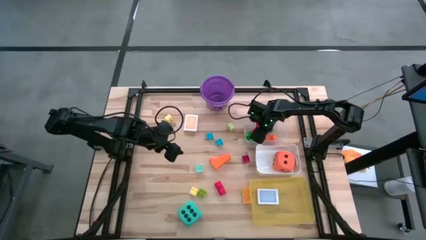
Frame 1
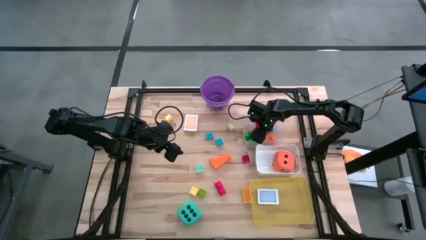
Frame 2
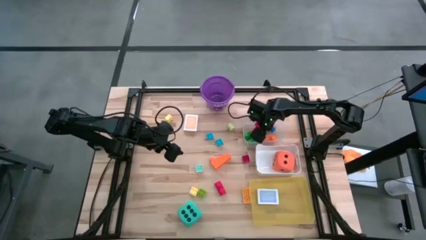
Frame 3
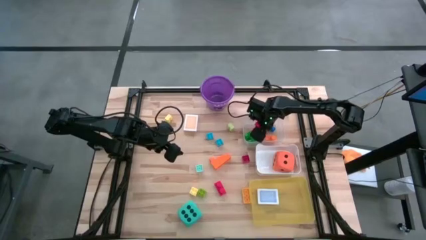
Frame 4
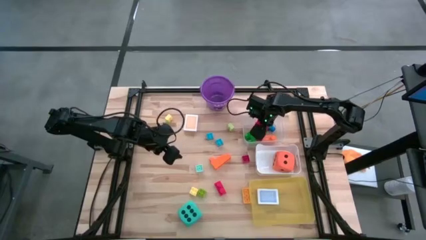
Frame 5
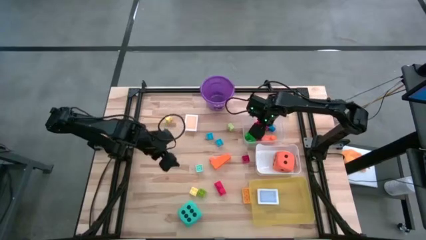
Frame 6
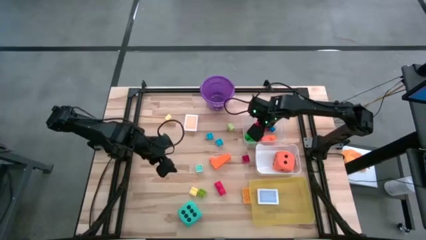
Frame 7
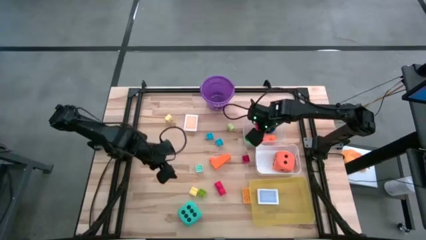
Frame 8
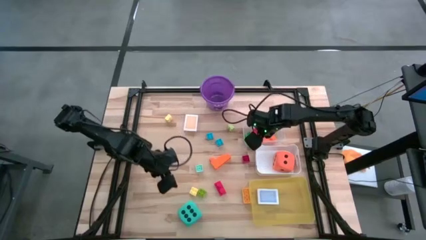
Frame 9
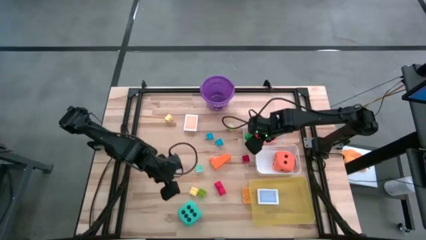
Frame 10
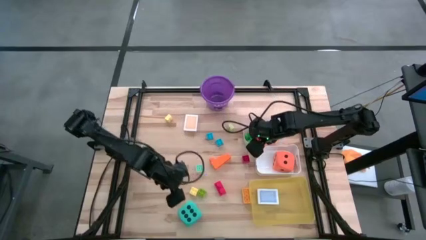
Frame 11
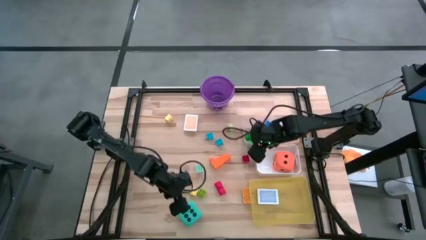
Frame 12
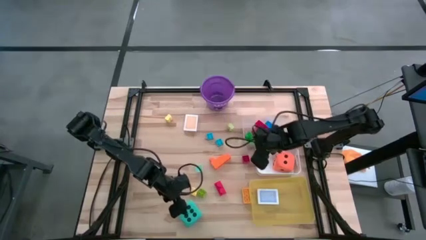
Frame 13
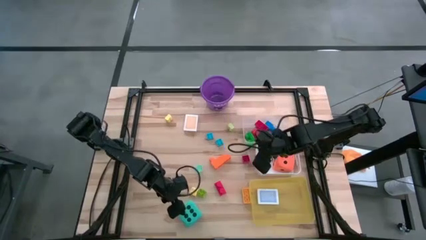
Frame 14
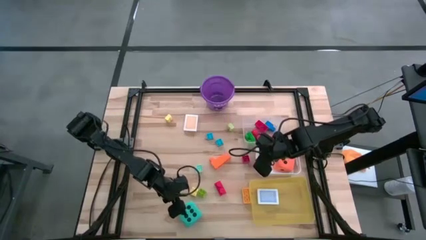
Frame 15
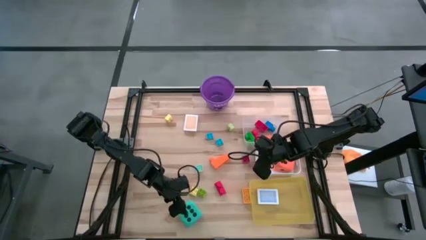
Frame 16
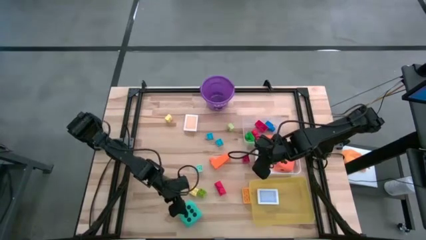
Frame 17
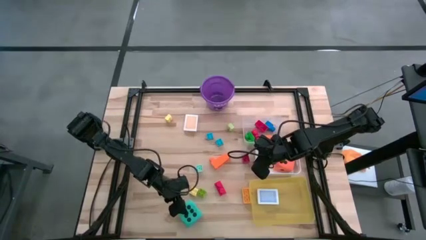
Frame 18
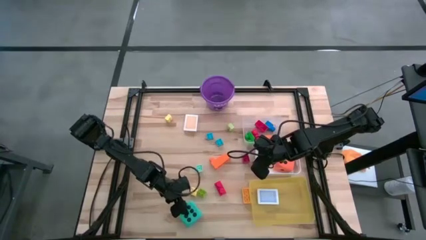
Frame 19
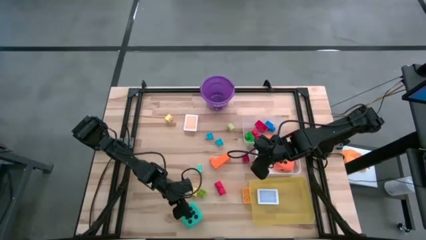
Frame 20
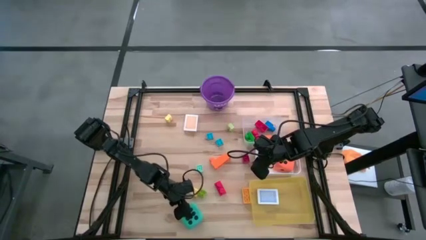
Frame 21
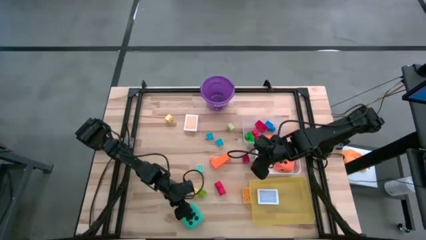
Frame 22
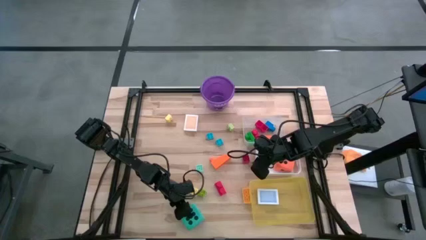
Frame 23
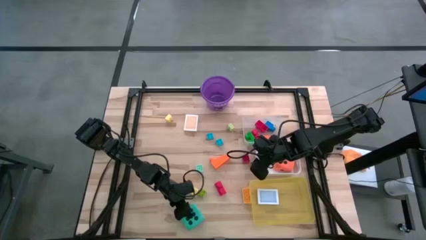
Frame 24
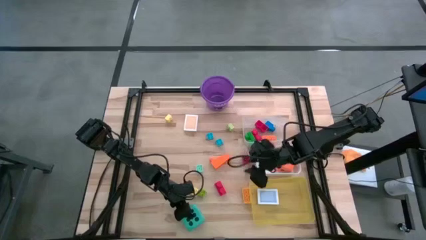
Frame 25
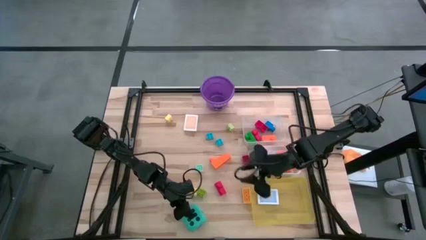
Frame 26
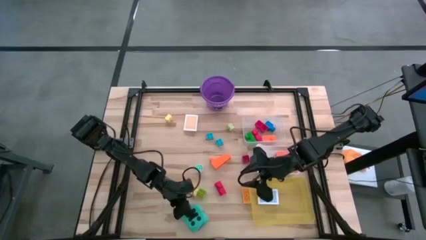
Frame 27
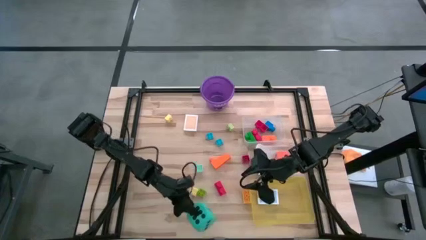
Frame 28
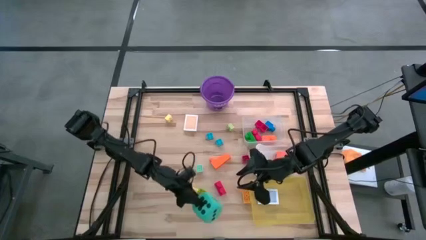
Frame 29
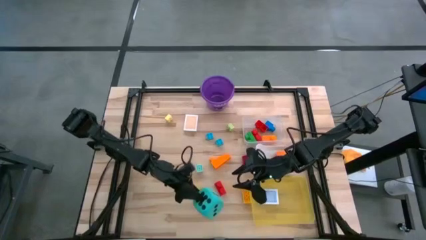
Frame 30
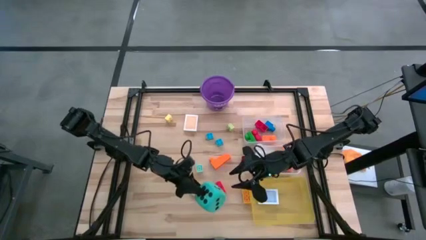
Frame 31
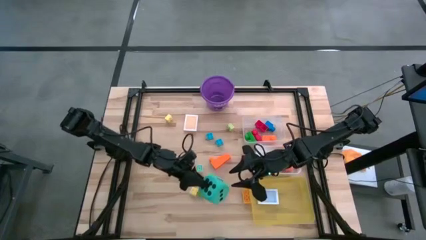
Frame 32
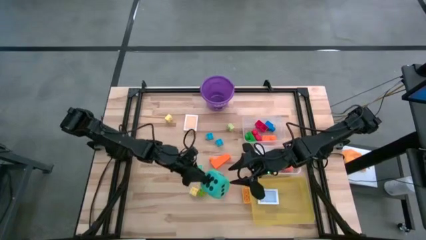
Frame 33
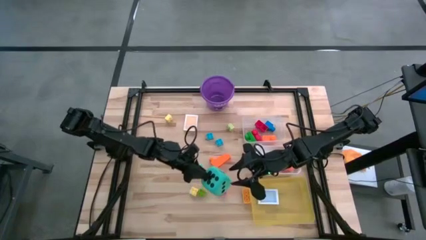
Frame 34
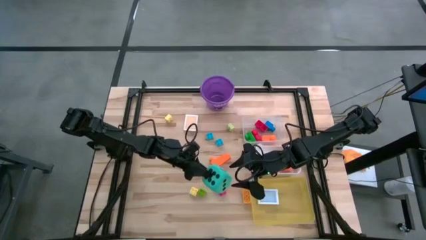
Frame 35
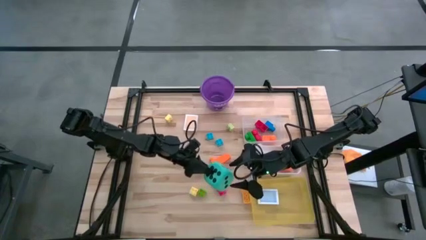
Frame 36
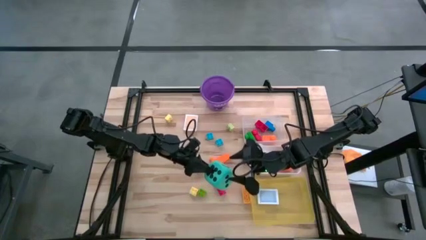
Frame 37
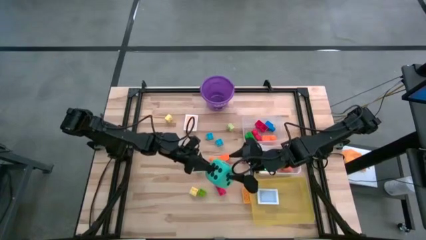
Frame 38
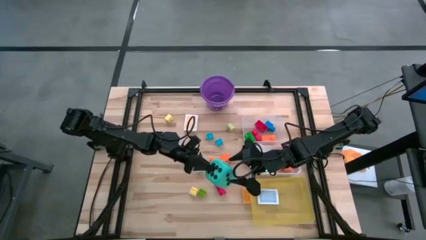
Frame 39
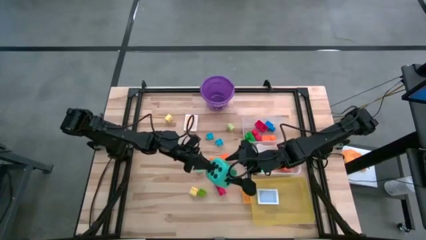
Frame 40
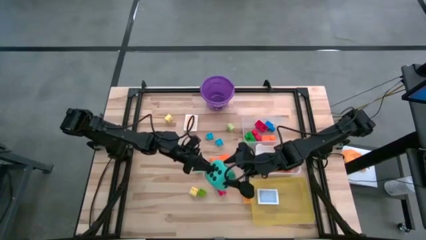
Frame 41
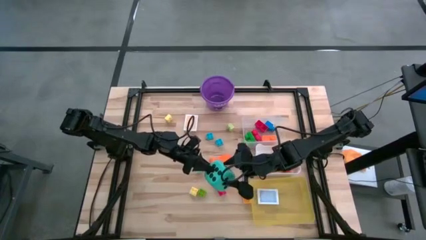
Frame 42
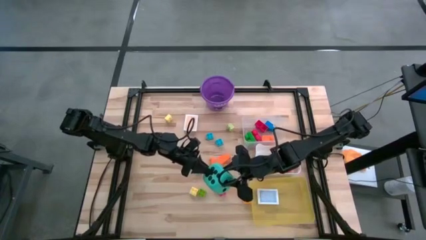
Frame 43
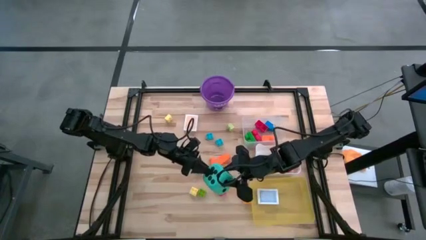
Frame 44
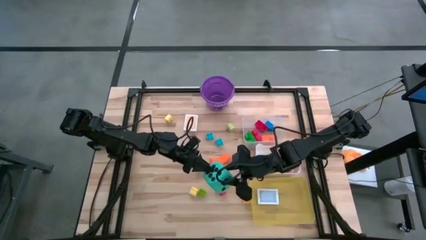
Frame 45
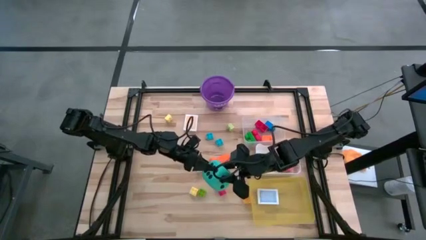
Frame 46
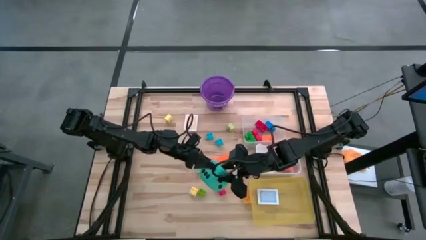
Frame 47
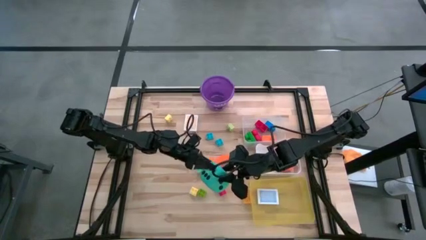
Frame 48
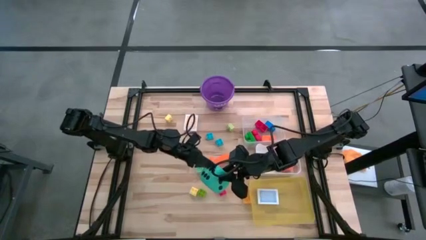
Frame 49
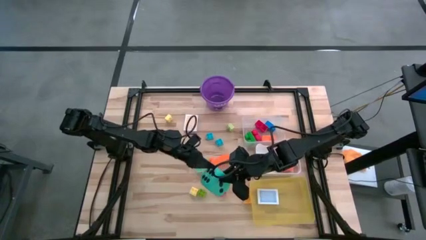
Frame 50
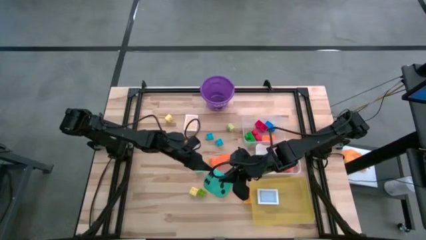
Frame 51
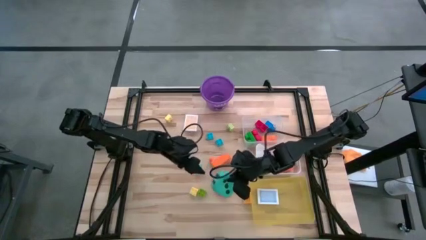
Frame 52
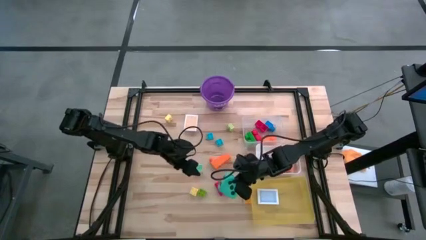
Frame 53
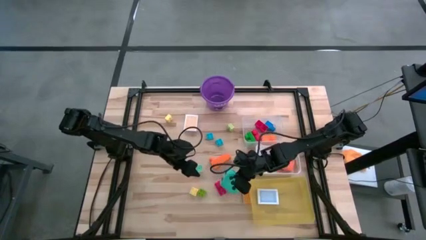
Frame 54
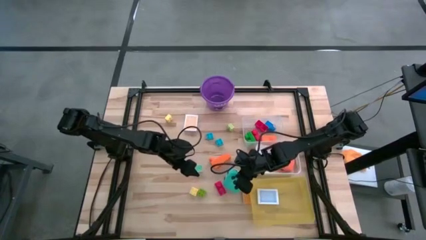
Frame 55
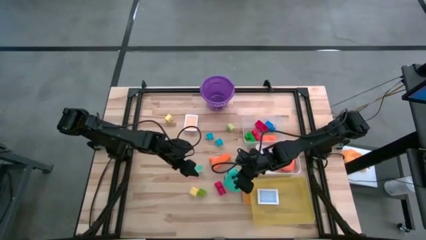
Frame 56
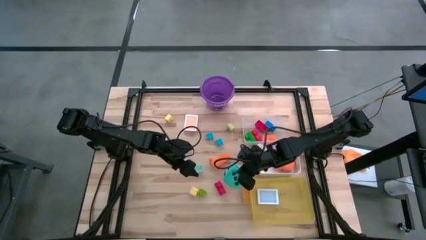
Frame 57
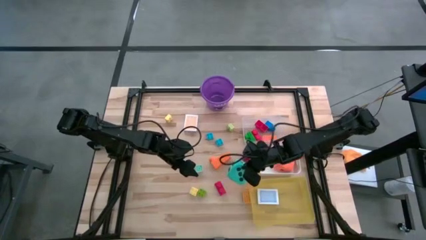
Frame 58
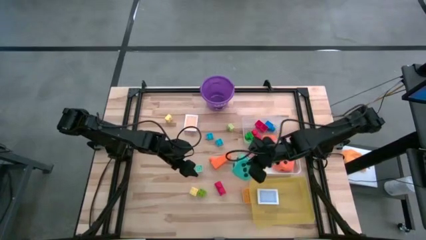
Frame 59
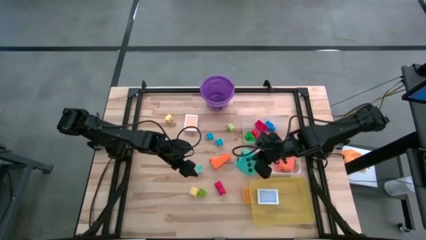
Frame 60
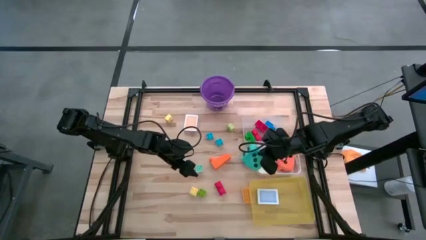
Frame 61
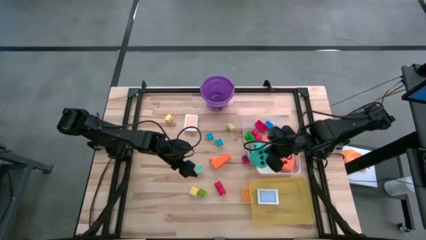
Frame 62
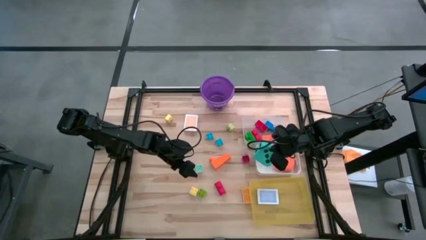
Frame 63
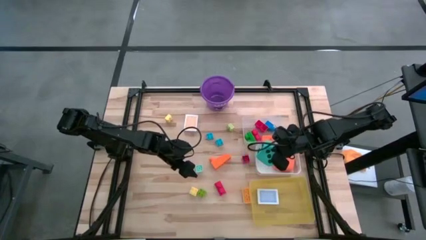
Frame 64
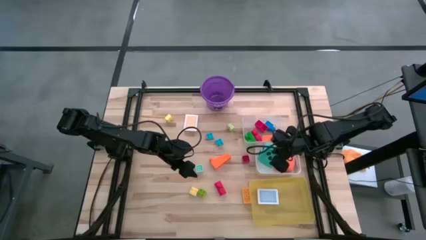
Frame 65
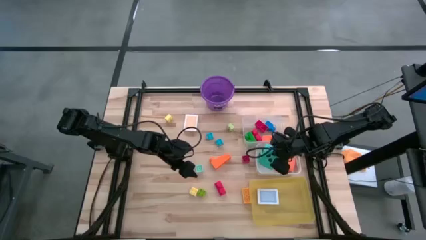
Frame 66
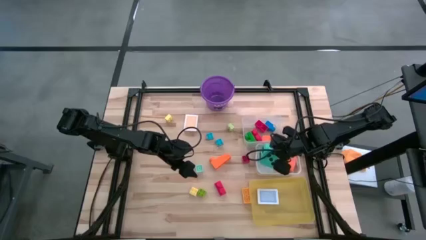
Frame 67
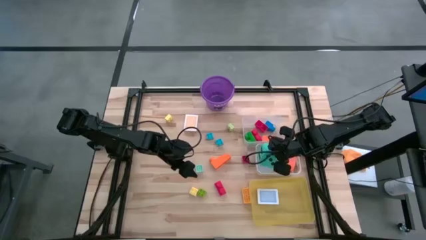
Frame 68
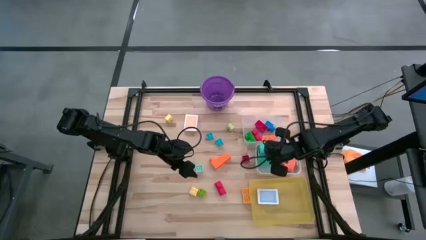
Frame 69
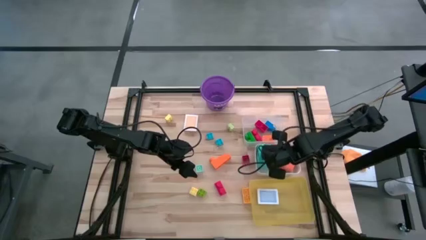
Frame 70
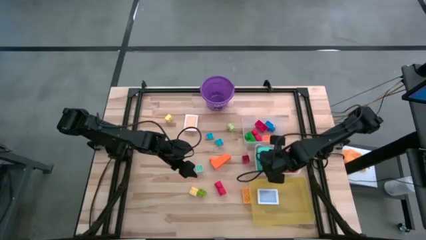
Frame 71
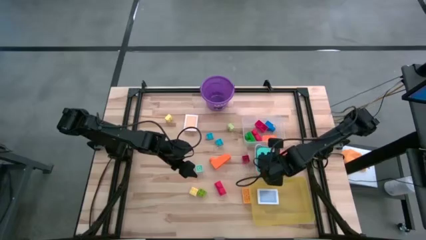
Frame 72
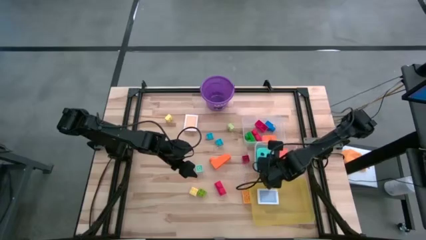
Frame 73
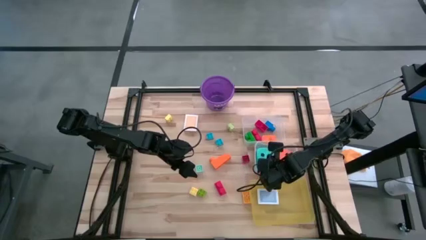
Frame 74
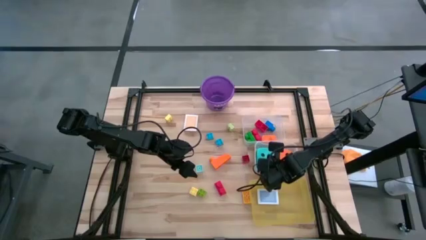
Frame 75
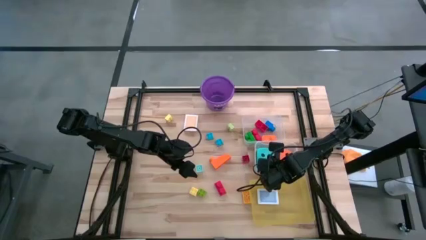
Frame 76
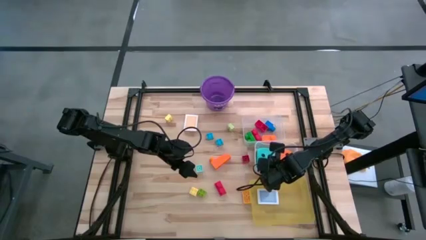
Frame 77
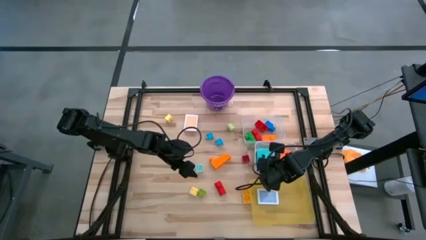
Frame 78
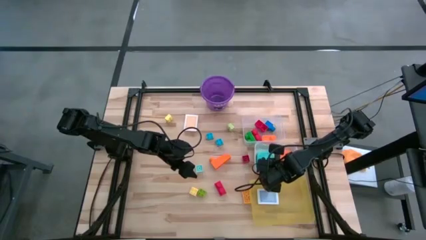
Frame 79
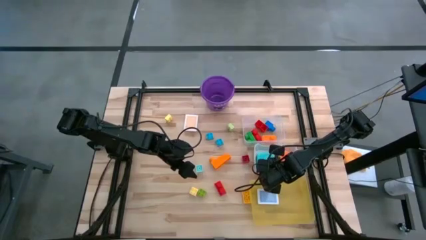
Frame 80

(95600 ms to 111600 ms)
Task: Pick & Place Toys
Put the blue dice into the white bin

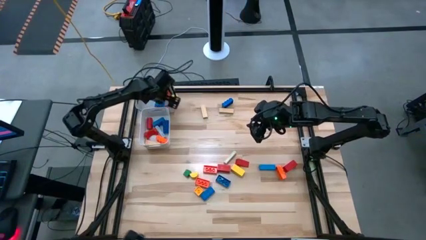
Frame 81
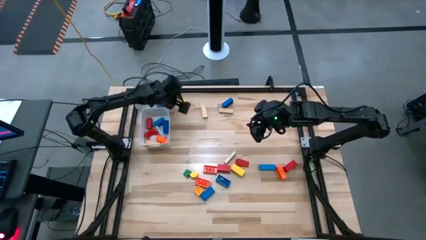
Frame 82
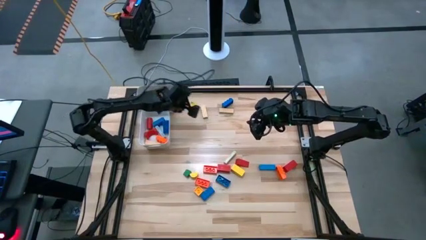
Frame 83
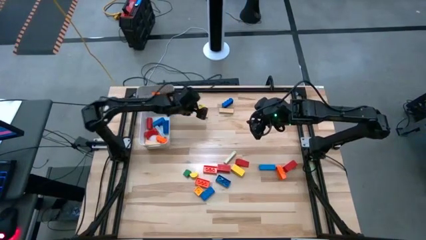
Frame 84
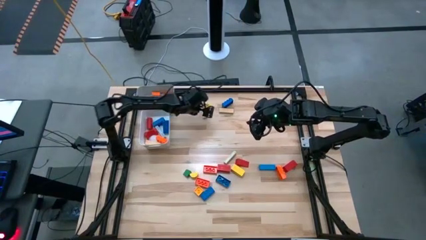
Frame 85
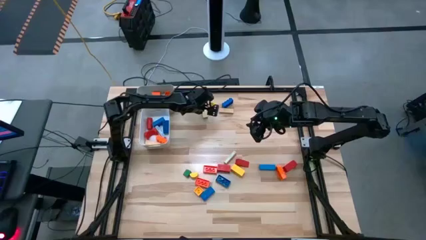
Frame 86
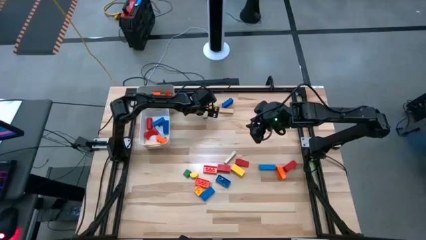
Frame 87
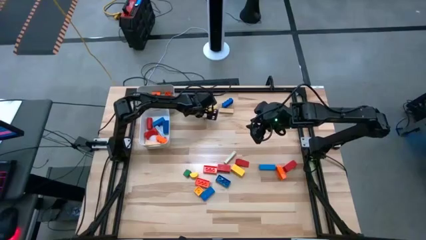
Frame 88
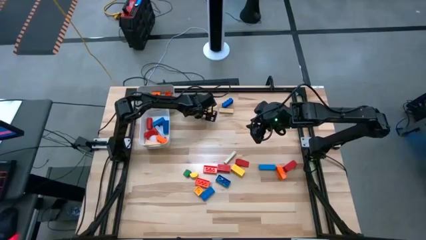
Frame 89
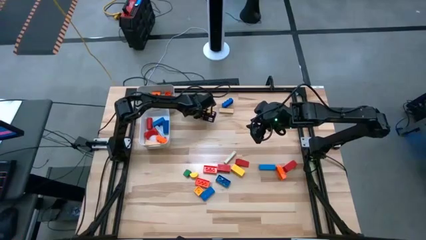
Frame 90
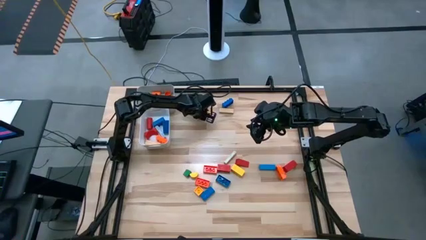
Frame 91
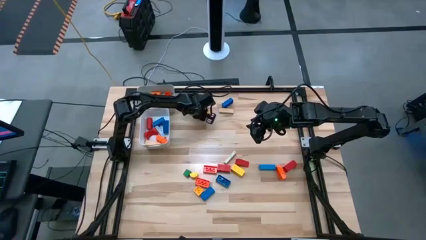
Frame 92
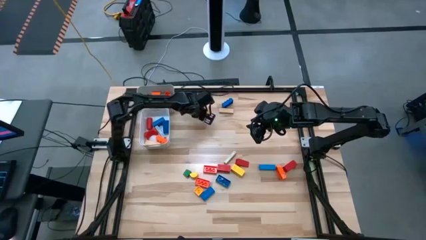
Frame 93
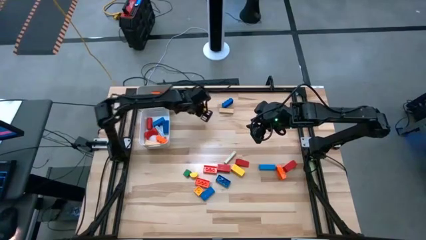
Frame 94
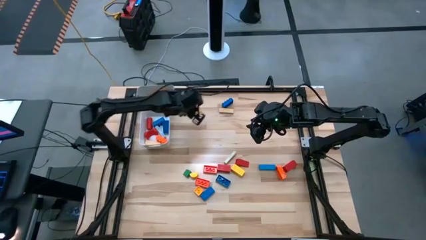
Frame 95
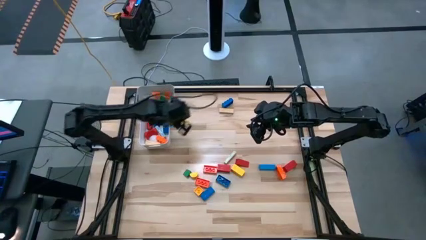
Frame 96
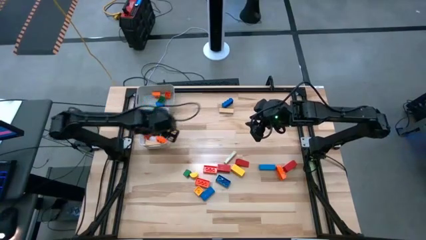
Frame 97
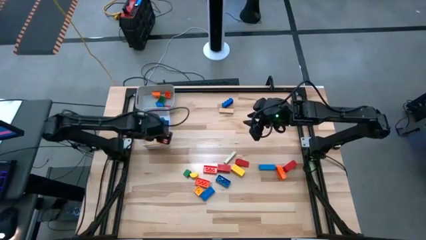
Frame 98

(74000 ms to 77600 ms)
Task: Sort blocks by size
Put the large brown wooden block into the white bin
